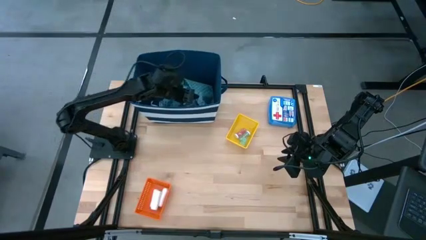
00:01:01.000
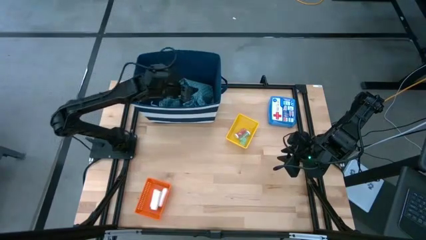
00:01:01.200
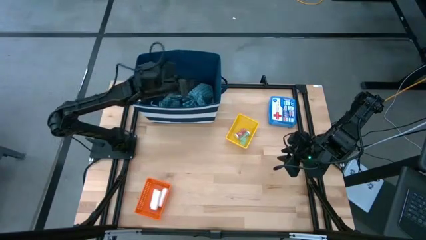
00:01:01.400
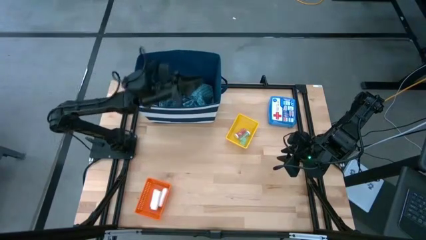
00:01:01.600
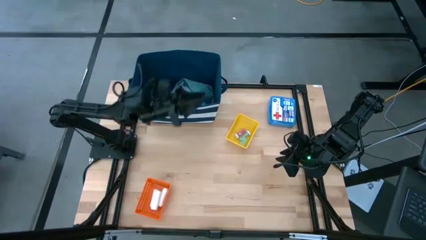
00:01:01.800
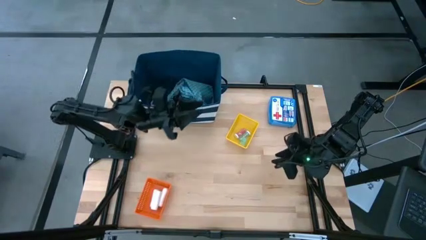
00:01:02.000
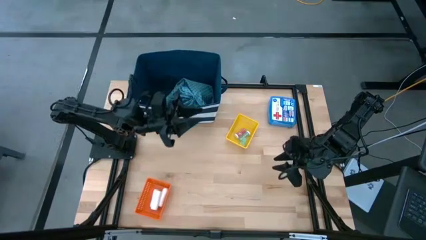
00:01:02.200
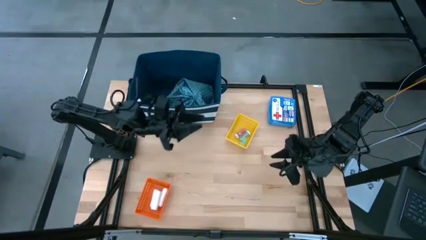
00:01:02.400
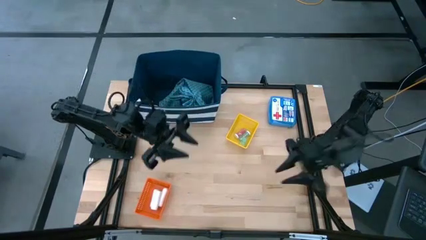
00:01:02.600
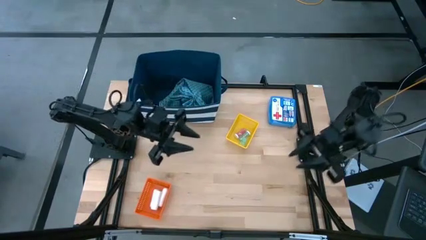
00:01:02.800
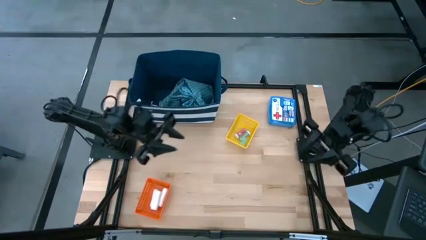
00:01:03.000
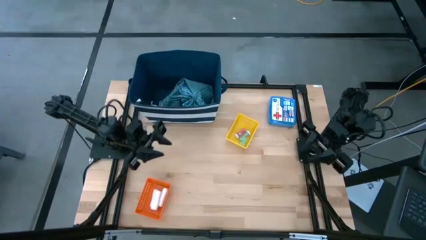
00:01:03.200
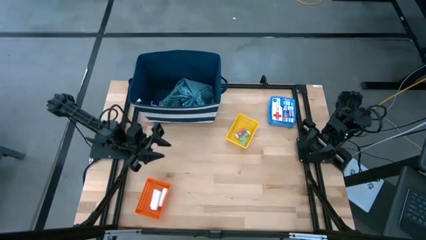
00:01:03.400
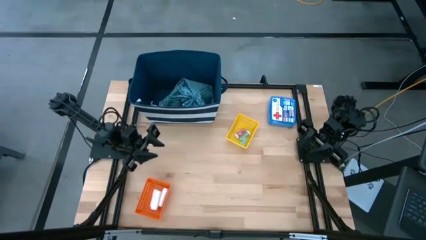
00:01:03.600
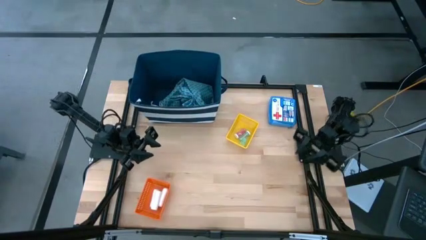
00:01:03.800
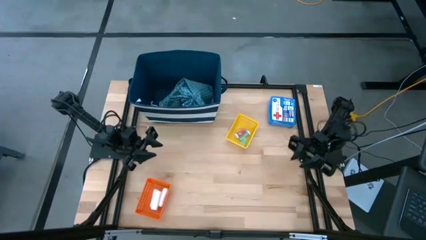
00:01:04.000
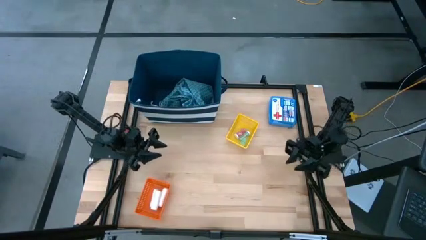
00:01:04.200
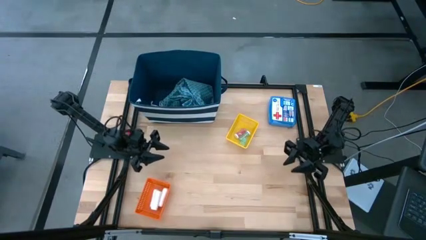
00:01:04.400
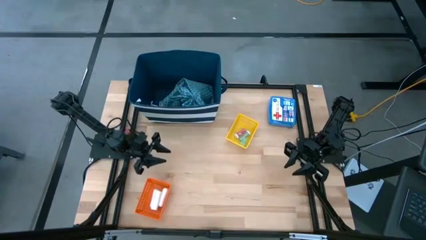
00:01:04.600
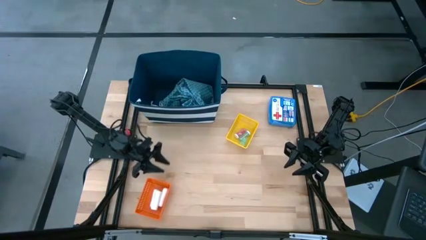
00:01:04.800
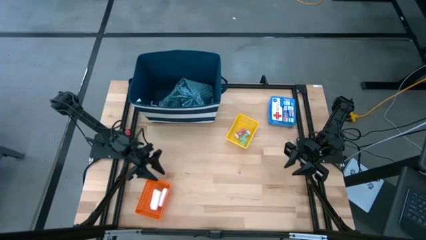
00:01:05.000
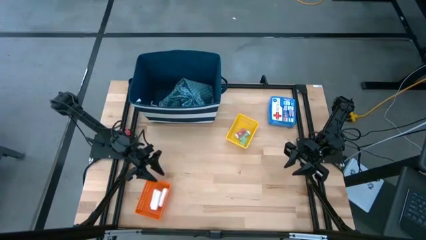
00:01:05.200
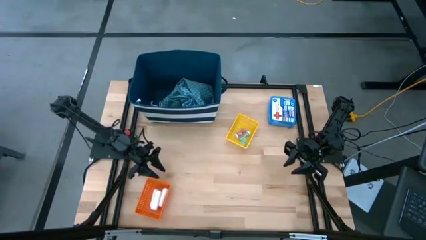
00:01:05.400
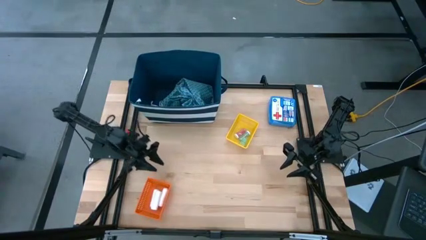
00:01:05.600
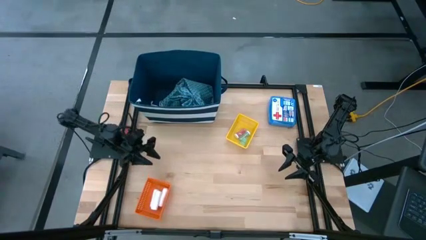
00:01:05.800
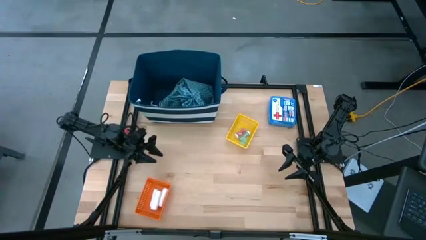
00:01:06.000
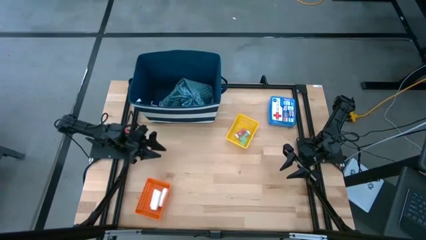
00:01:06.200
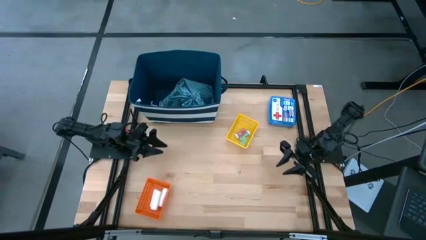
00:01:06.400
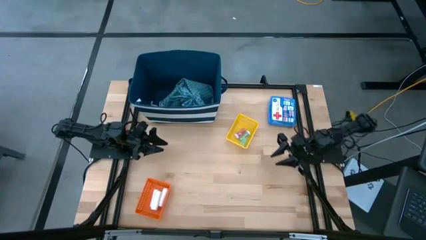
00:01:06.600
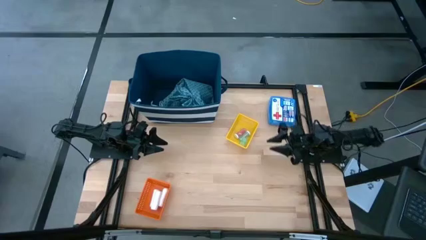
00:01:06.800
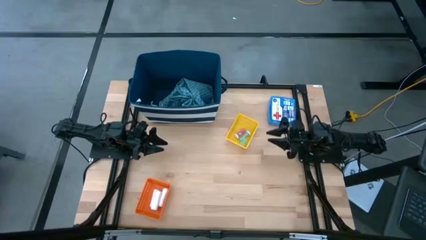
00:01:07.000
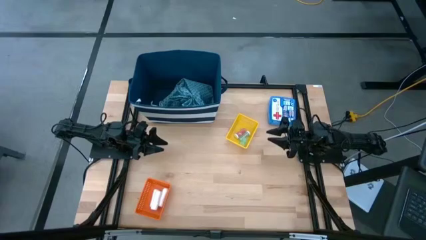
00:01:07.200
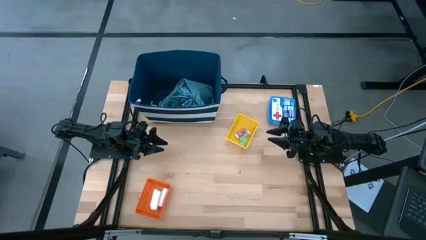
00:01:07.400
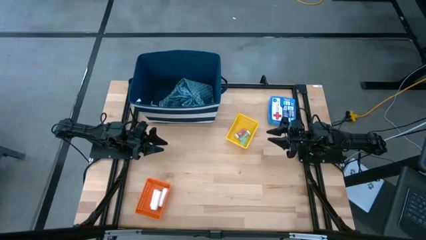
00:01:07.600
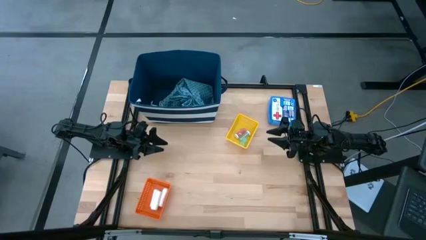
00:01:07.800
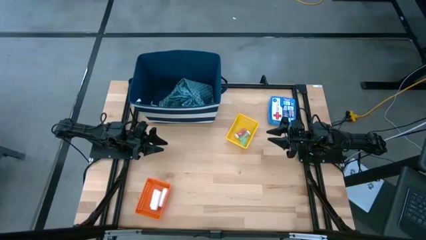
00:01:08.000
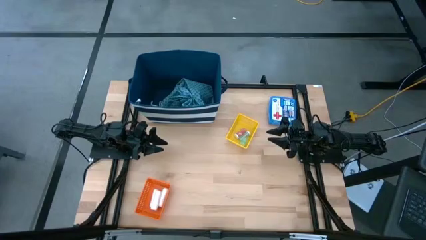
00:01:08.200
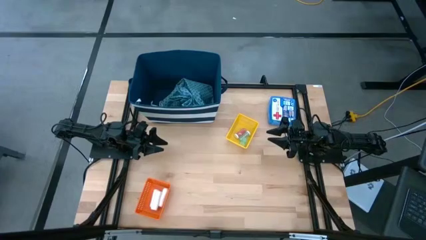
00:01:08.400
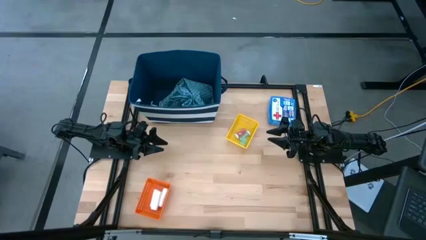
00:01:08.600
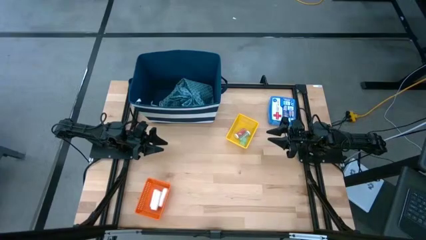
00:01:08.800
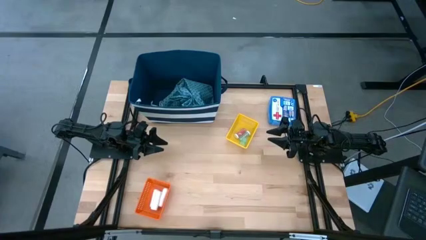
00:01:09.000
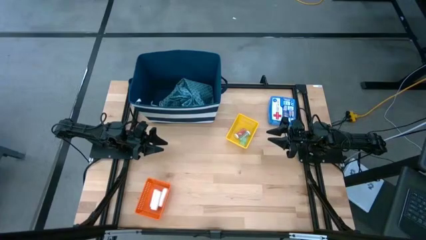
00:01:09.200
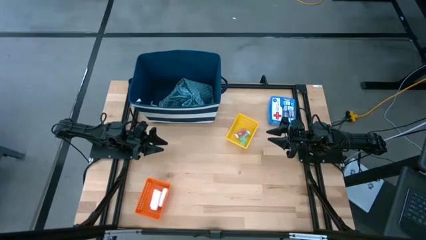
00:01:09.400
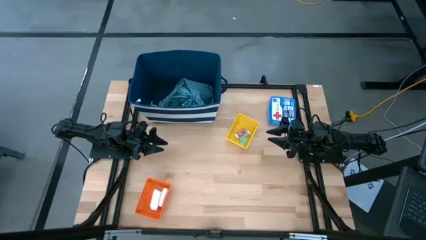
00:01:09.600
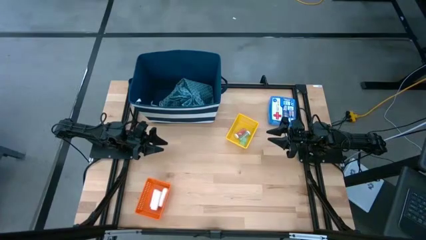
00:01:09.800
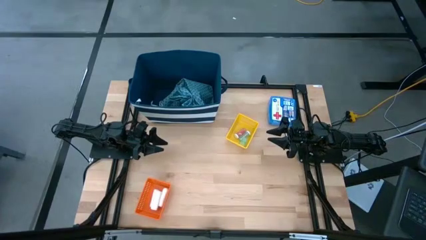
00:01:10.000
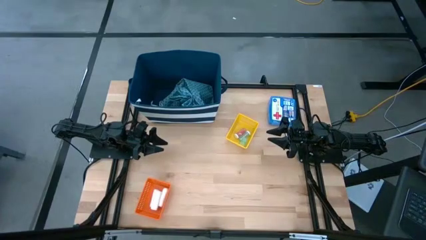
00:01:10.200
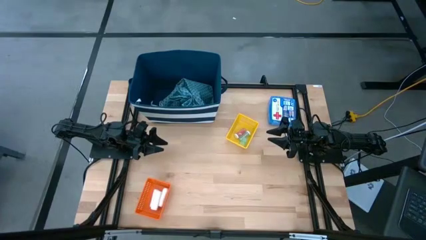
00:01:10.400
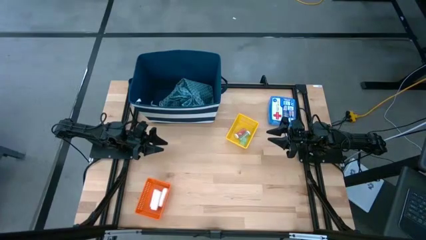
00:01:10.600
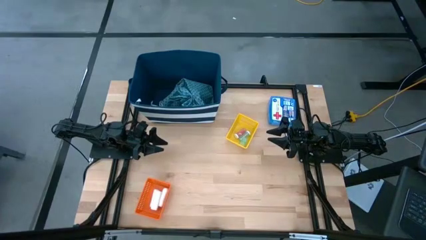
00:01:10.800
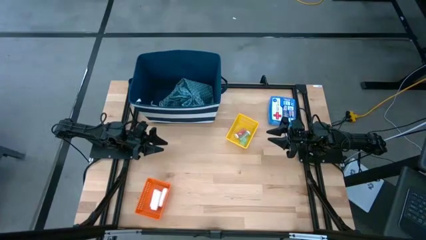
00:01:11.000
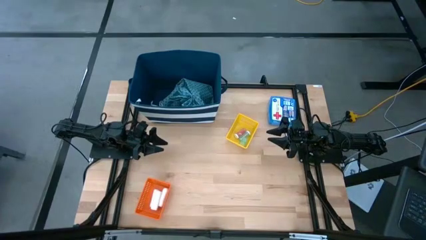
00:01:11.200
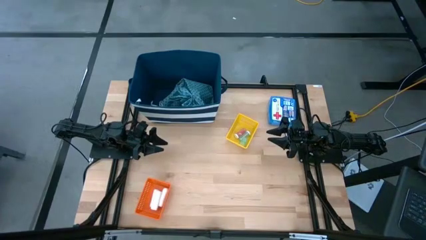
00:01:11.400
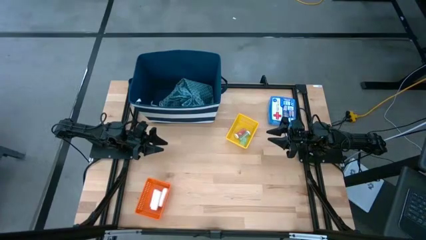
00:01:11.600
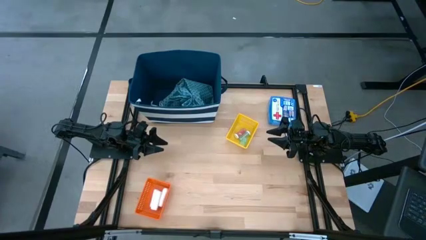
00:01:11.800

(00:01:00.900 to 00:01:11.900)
Task: Pick & place medical supplies in basket/bin
Return to Home Position

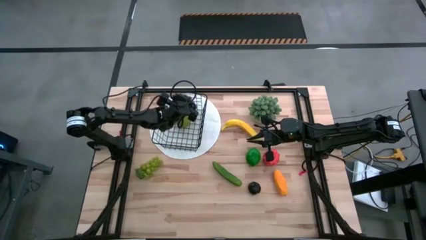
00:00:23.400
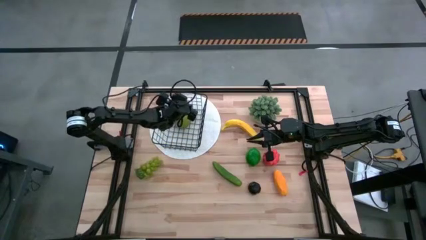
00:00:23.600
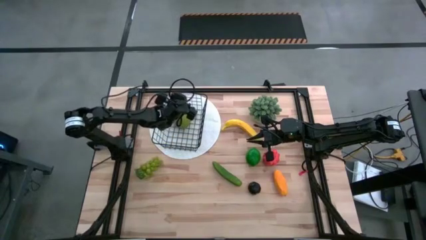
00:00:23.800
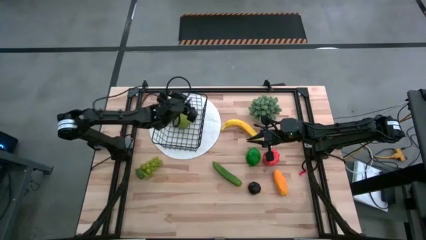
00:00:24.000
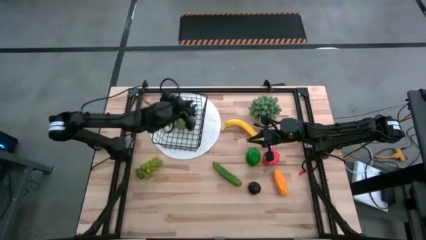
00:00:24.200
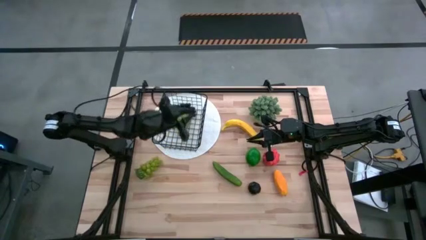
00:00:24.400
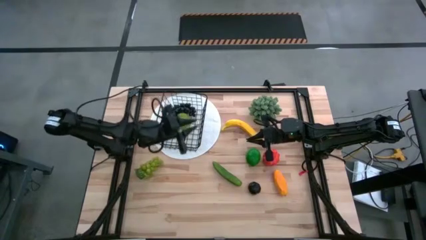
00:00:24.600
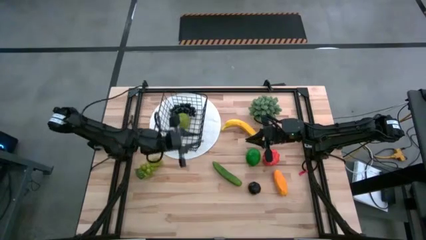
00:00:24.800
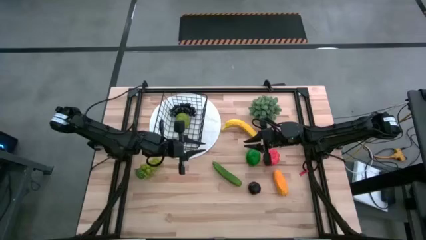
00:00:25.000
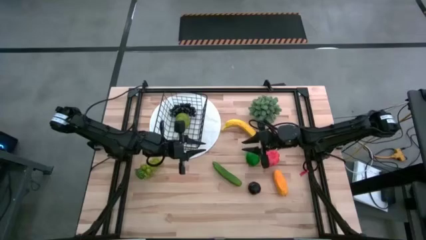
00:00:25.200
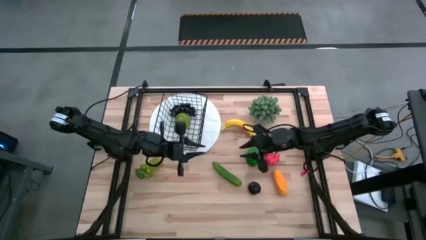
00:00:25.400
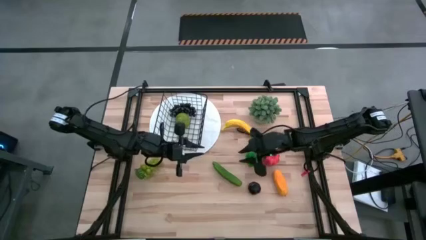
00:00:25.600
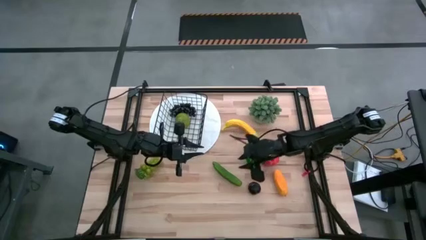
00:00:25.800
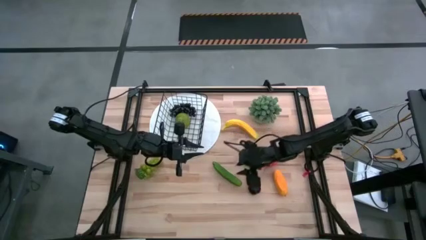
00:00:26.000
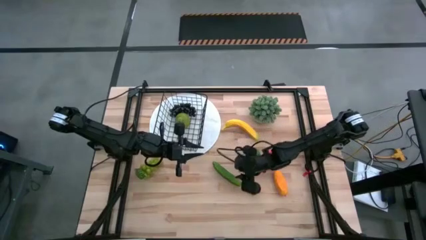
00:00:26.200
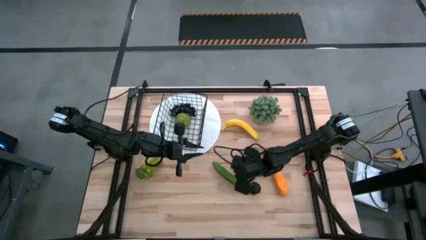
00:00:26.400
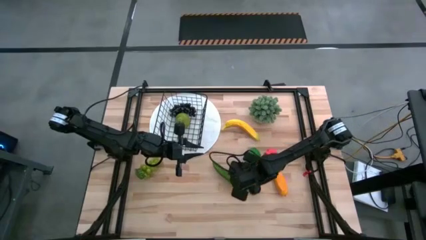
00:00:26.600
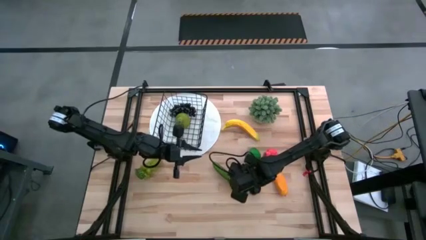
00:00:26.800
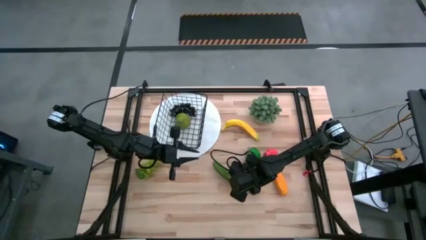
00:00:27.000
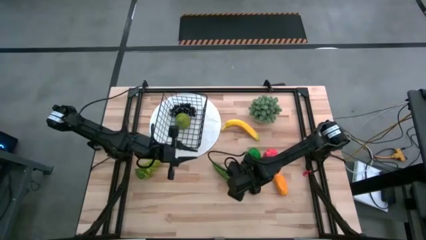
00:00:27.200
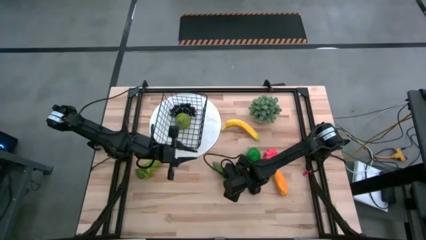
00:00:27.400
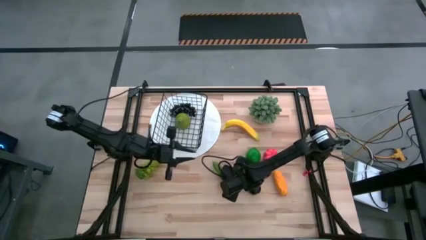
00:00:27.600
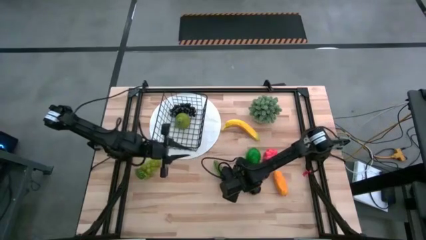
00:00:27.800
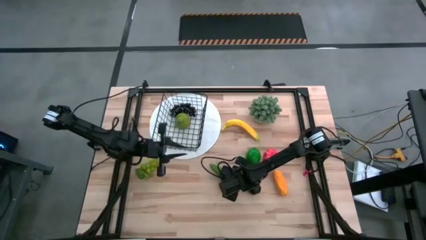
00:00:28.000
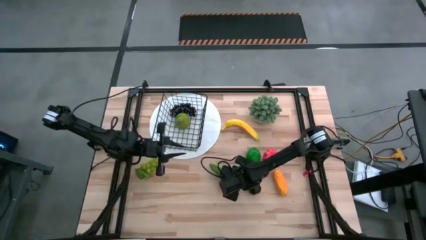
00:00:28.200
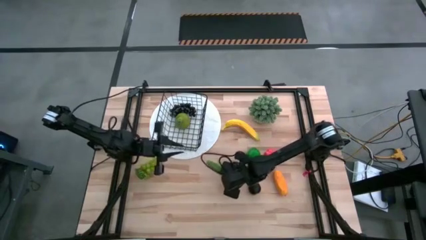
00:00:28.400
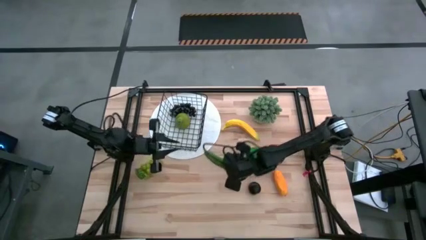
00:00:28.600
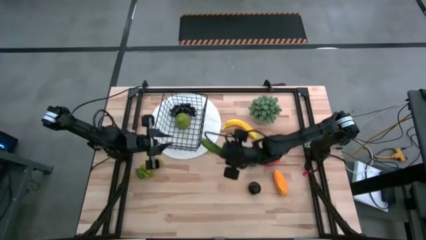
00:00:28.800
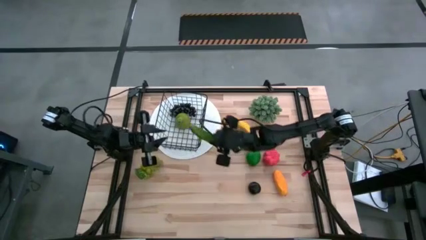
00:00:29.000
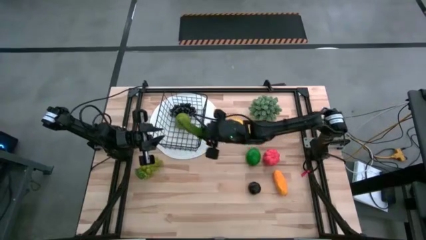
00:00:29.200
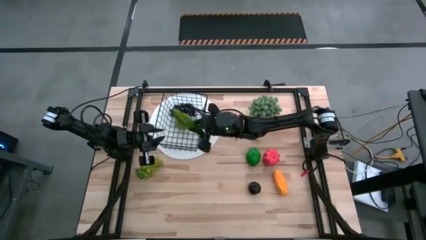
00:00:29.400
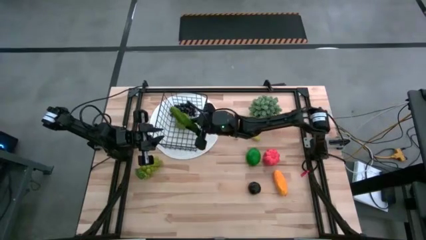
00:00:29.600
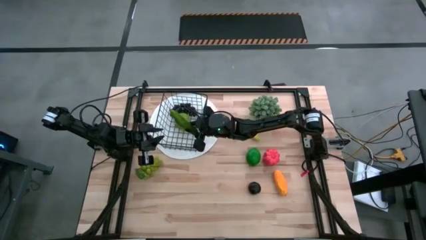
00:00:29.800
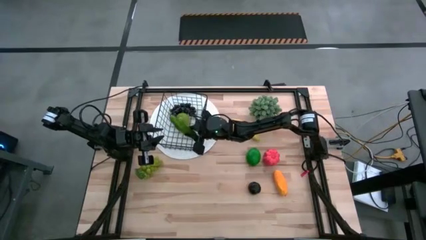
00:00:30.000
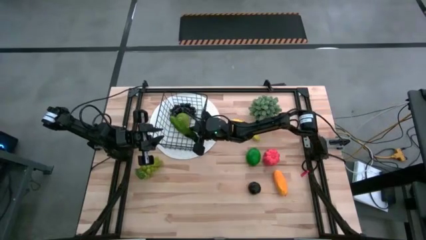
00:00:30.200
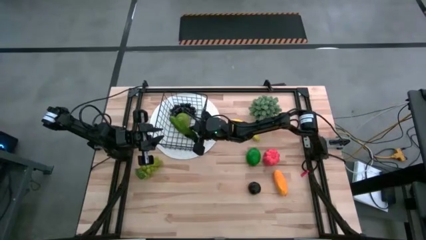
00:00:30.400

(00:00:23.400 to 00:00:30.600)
Task: Build produce basket
Put the green cucumber into the wire basket
